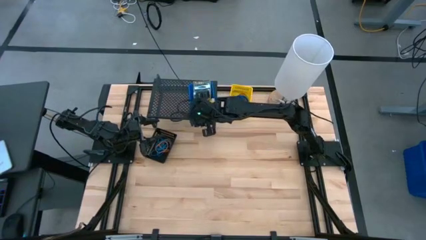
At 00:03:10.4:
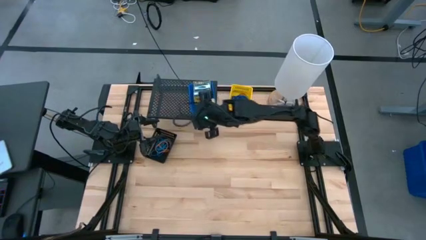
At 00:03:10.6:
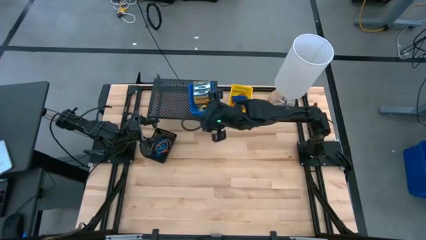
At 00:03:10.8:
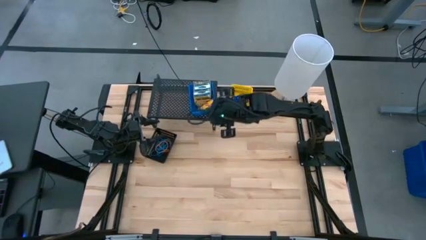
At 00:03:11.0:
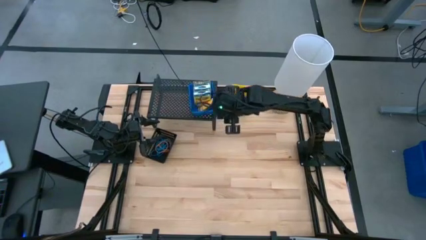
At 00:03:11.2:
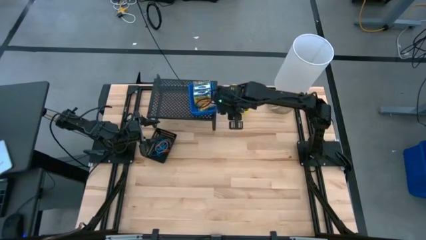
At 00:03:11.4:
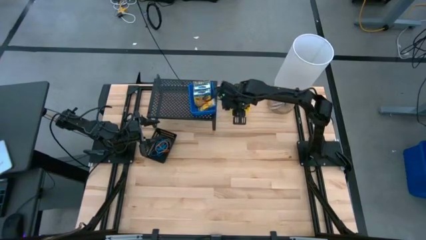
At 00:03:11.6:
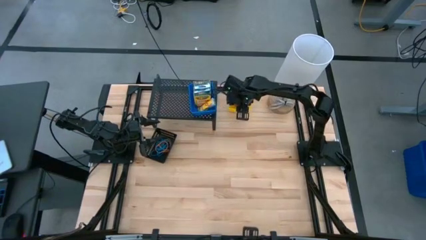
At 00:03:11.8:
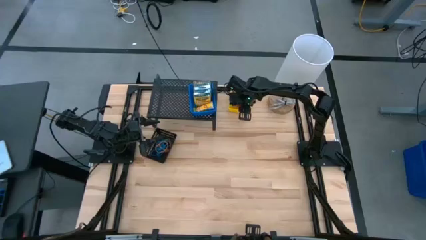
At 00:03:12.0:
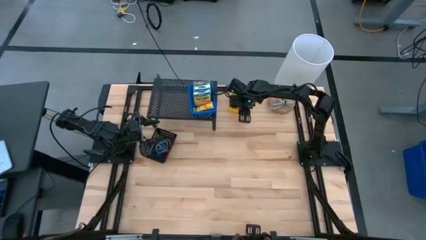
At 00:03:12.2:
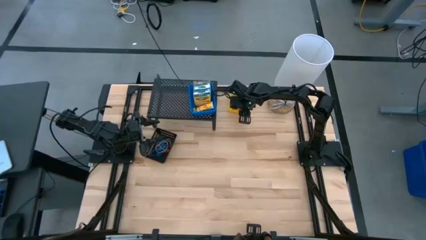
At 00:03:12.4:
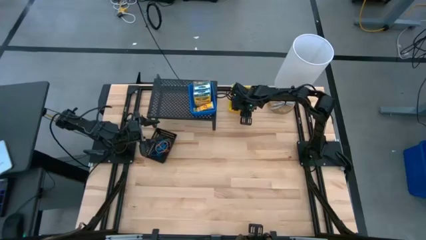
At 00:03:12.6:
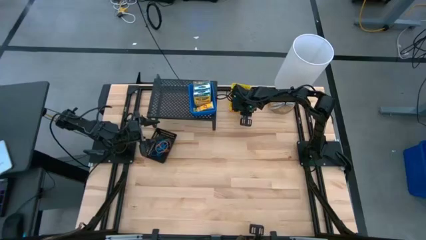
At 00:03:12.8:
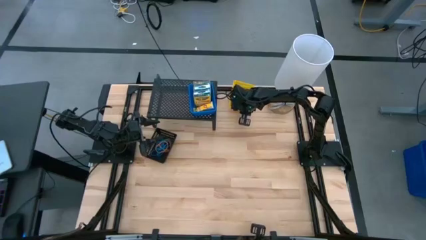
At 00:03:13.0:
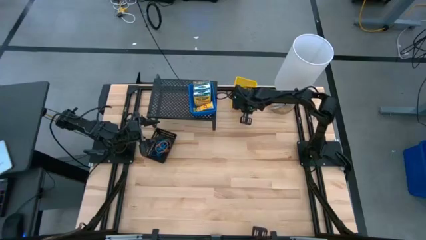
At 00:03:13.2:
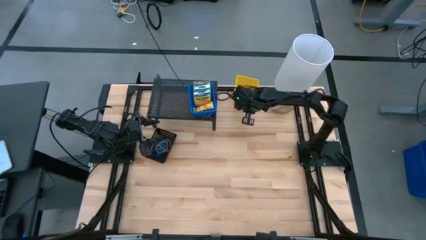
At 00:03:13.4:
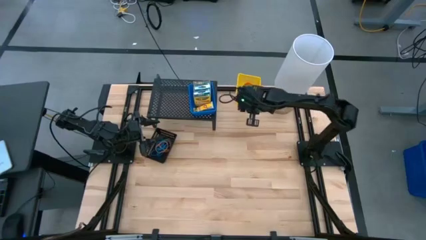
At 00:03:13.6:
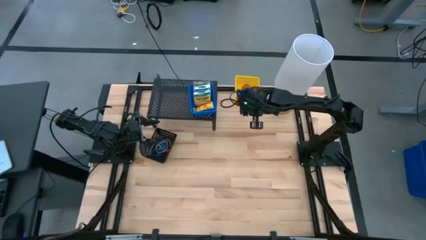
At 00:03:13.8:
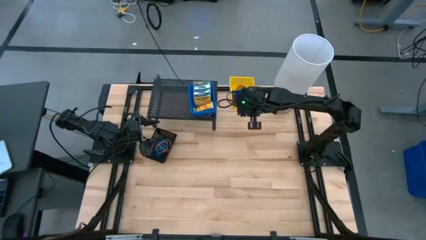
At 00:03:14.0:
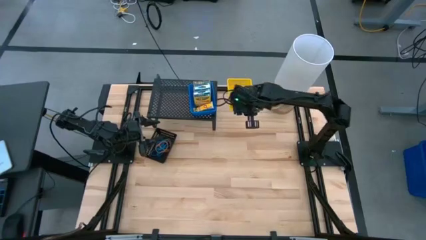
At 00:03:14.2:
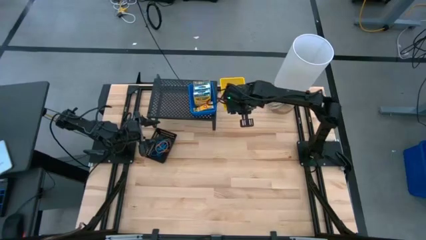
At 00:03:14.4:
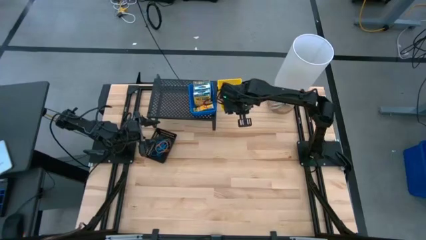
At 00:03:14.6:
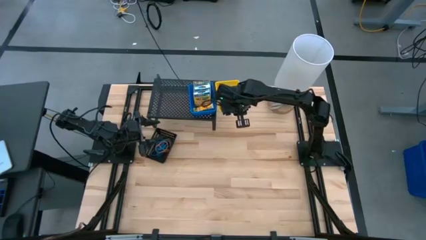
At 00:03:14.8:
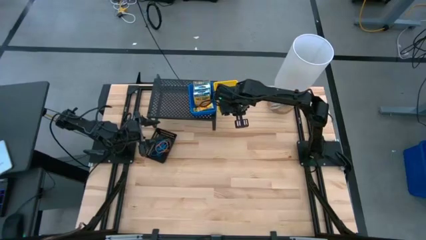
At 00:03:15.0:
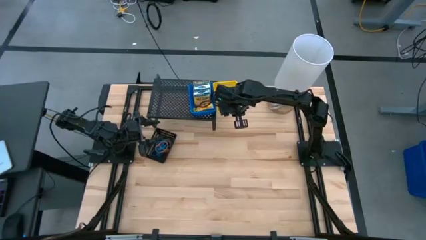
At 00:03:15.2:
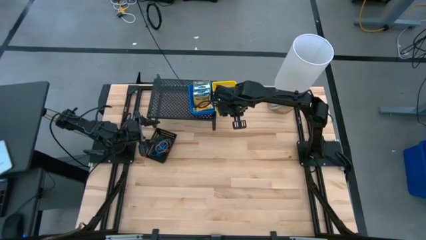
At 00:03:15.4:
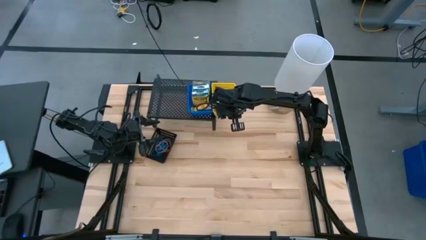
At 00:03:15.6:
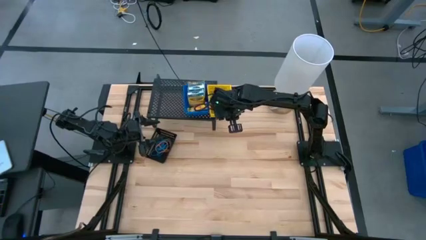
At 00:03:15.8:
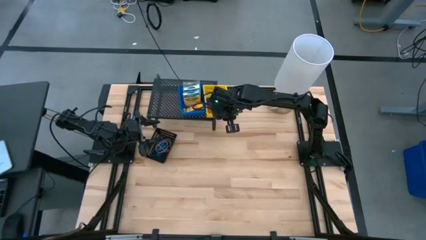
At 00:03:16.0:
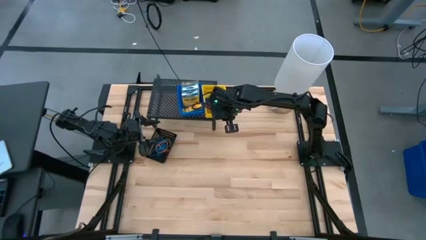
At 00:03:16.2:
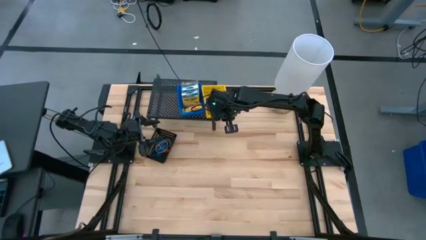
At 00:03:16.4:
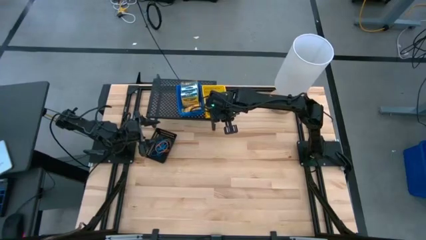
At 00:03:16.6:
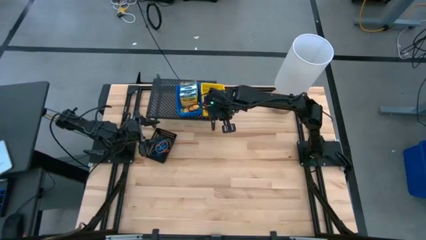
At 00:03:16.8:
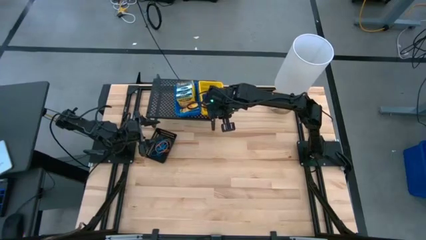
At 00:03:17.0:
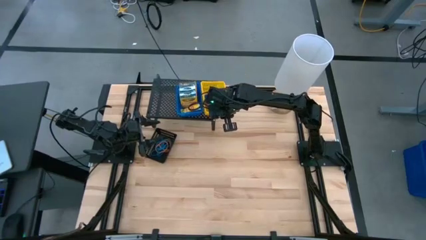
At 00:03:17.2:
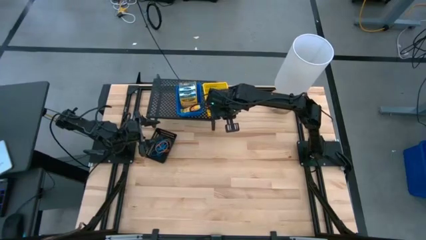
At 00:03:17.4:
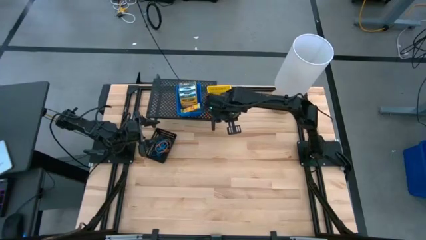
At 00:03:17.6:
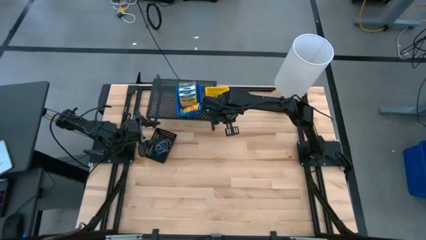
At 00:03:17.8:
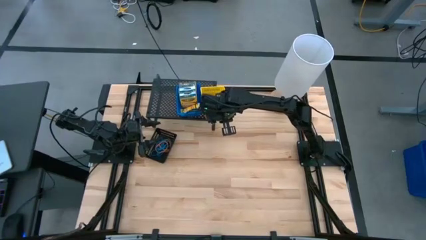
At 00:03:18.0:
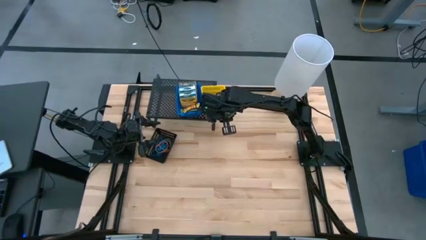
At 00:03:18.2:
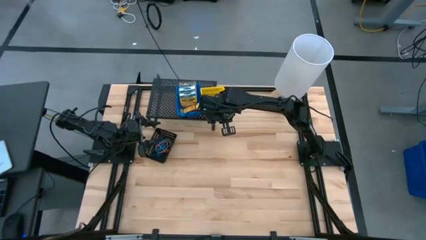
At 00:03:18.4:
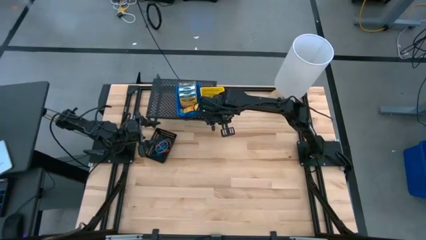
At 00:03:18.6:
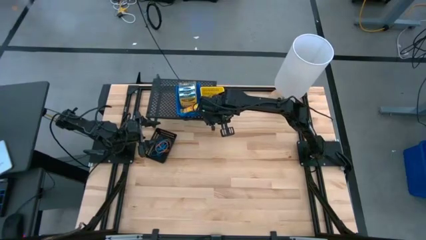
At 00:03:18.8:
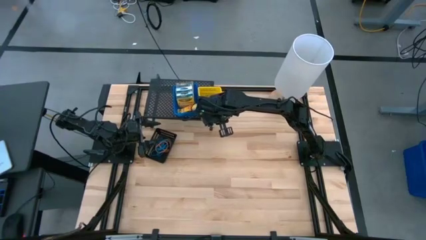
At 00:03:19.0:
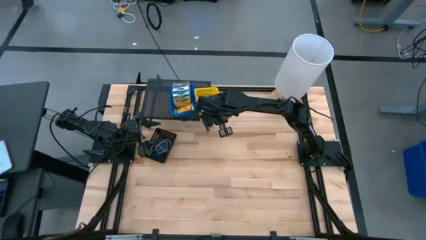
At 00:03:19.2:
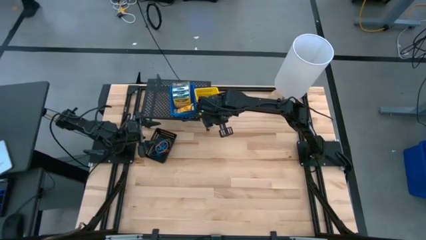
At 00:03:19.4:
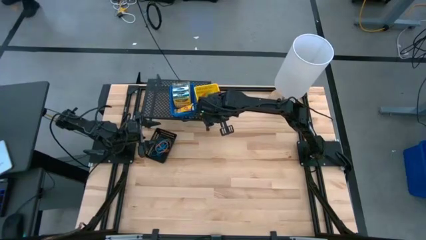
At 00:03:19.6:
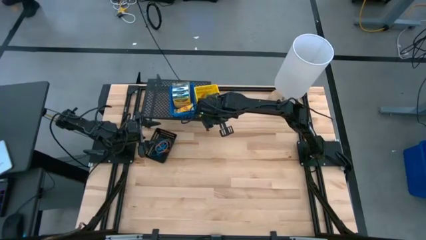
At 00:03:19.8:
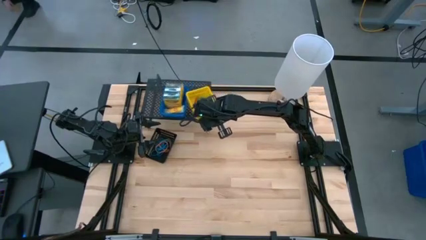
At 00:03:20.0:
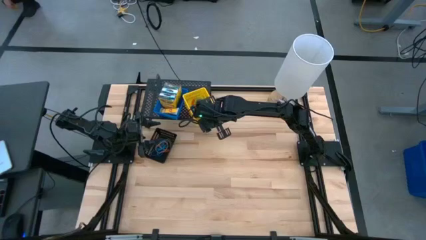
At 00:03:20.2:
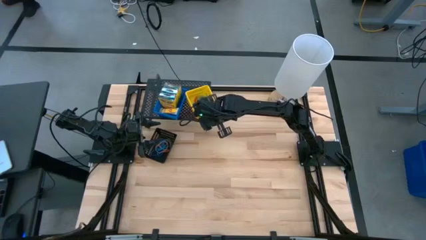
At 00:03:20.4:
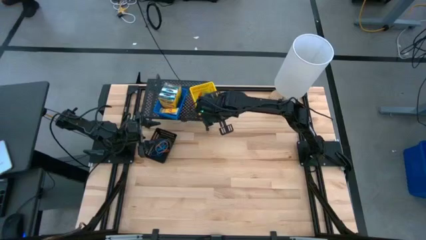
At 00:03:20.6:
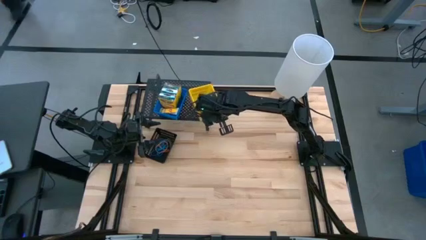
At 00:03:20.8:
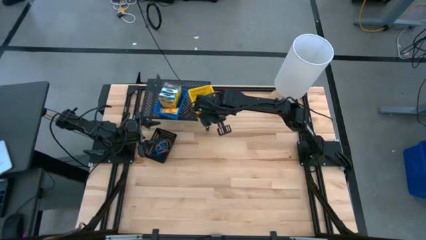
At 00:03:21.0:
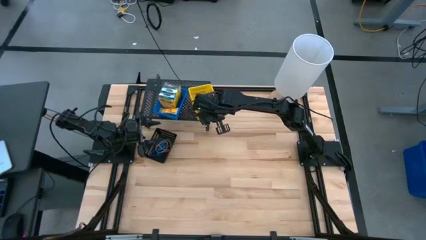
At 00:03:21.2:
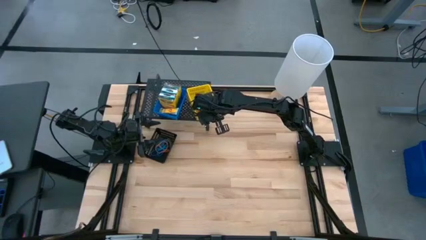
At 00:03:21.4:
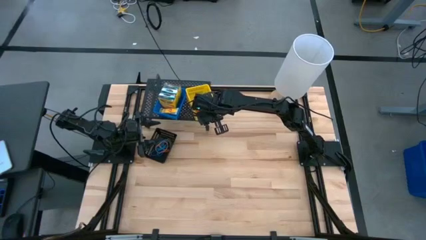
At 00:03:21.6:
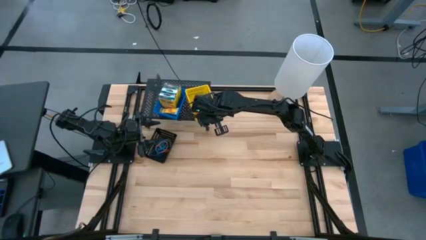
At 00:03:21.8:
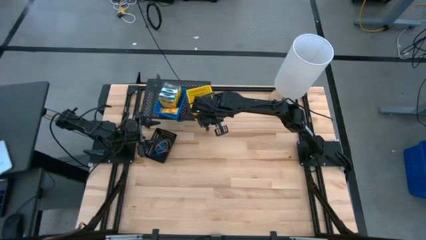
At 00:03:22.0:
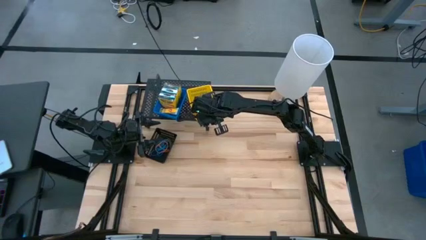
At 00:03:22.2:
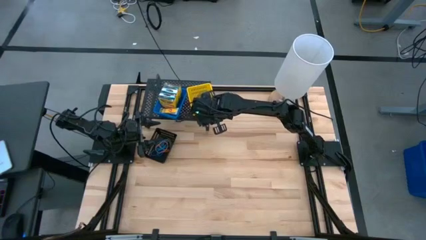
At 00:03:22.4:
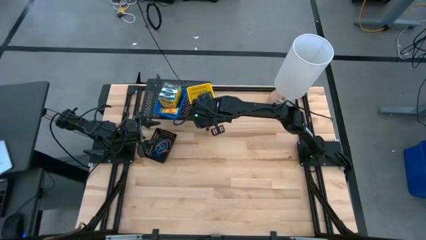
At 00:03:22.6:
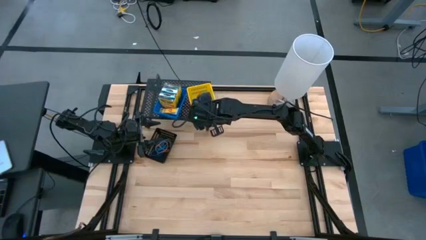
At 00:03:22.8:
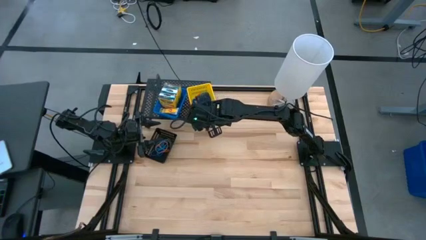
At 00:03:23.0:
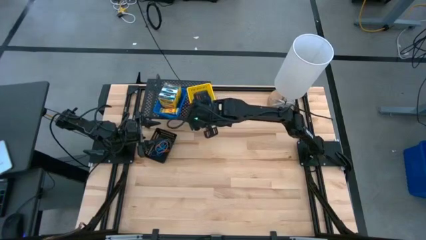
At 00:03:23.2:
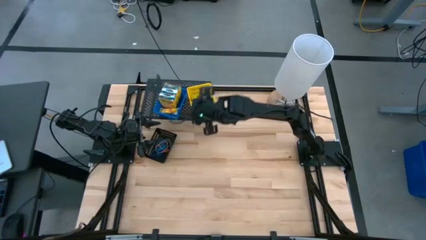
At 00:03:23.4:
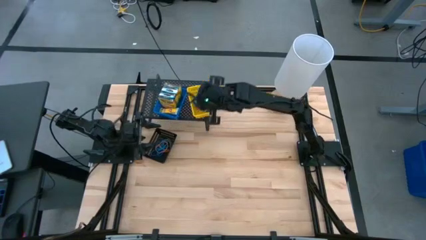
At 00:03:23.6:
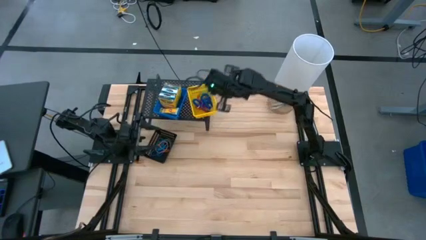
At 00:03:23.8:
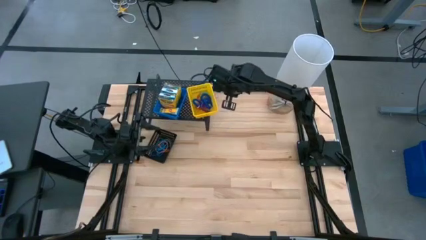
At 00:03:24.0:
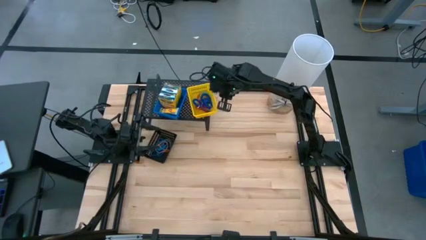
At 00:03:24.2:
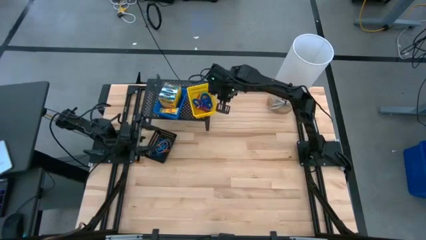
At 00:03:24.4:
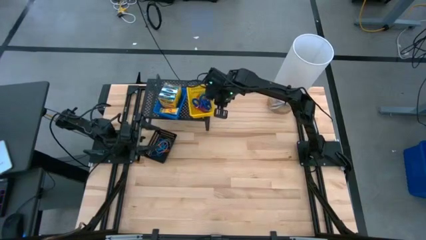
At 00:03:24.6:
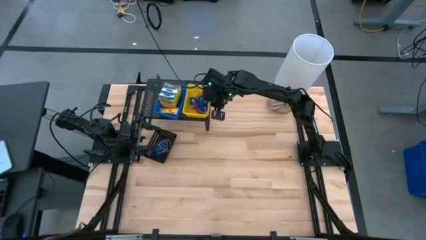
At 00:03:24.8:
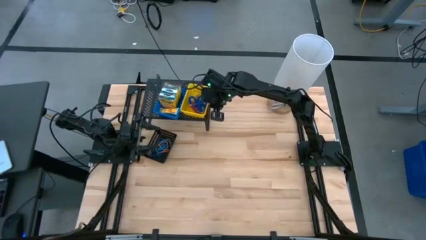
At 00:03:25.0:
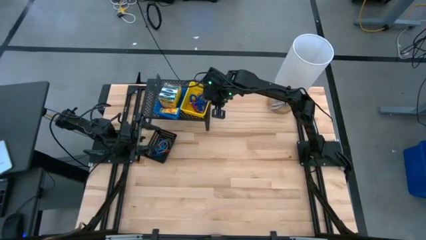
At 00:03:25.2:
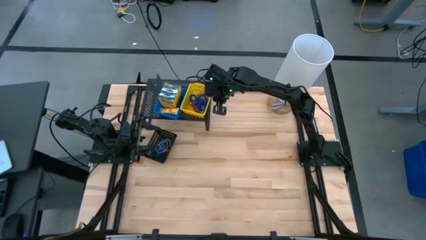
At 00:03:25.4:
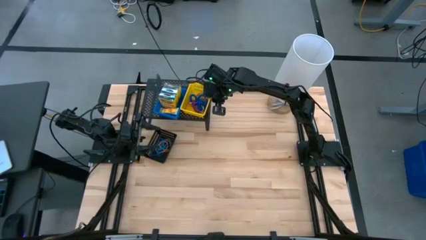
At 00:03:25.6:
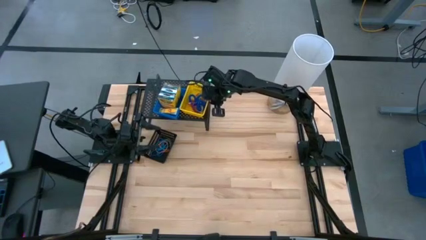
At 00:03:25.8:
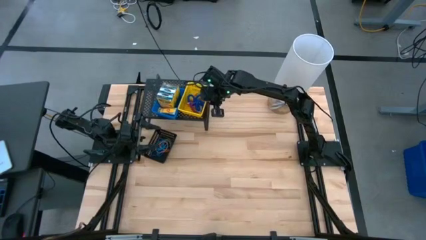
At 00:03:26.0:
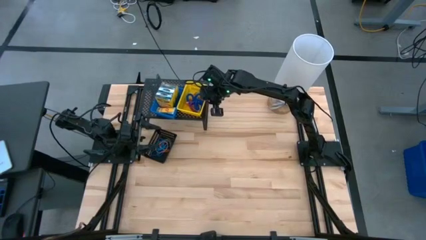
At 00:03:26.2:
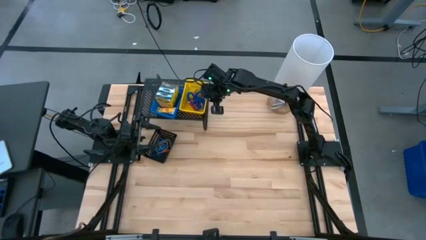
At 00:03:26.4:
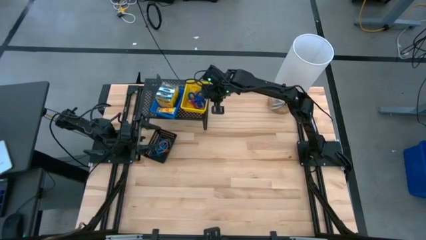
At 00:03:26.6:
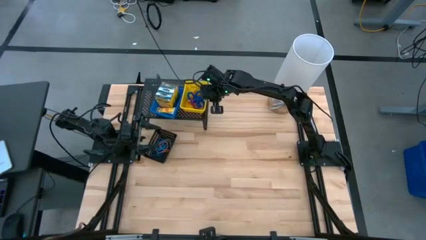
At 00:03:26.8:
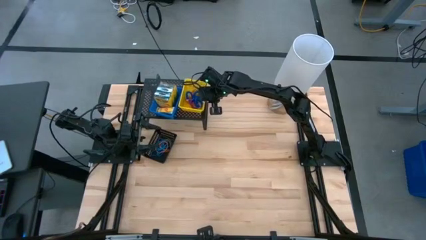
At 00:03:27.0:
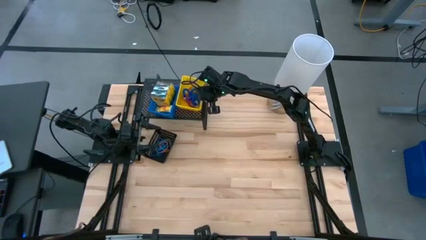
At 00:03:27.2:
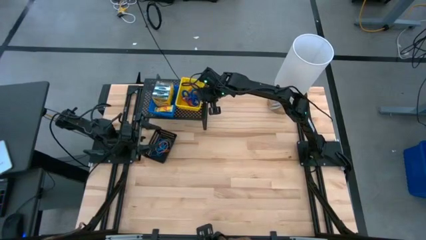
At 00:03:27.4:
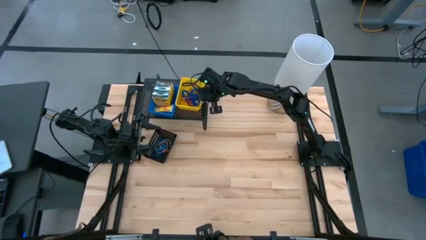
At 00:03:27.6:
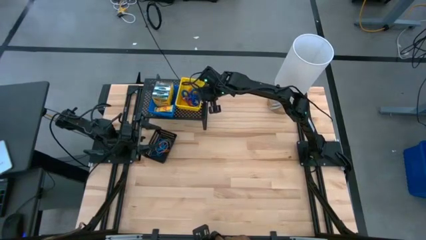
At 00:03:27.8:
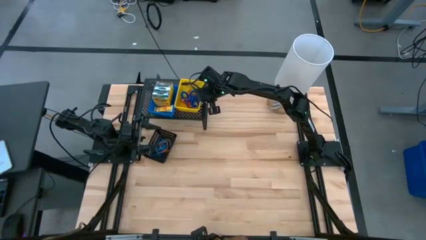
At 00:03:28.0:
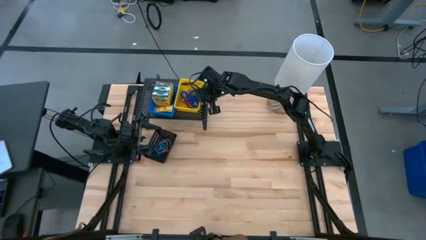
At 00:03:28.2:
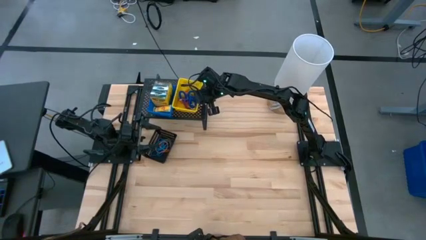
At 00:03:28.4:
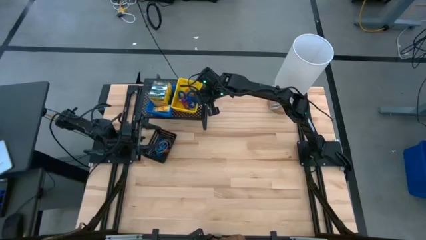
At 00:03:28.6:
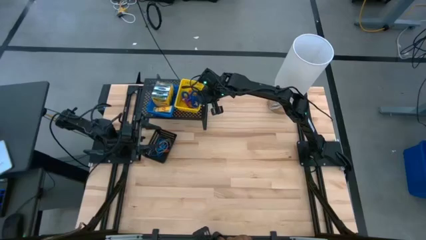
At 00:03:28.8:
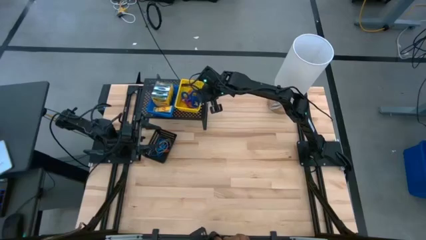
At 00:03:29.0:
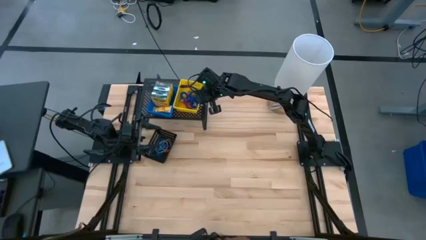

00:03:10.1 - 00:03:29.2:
Task: Pick & Place Office Desk Supplies
Put the yellow bin on the shelf
